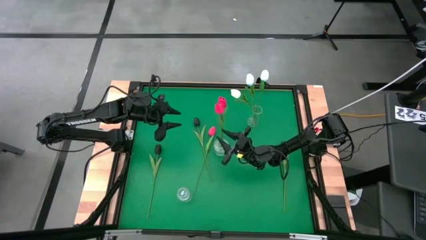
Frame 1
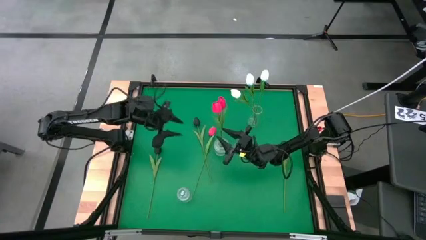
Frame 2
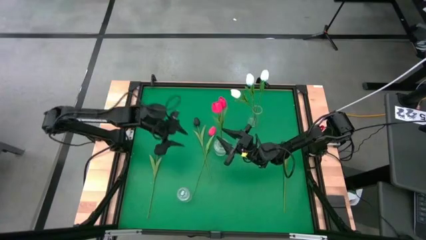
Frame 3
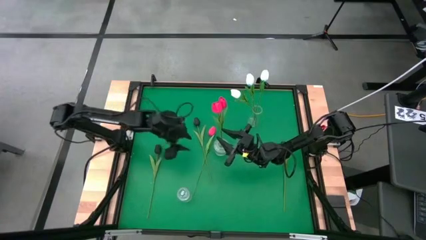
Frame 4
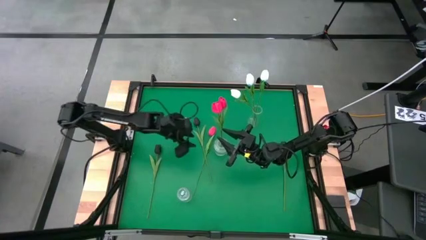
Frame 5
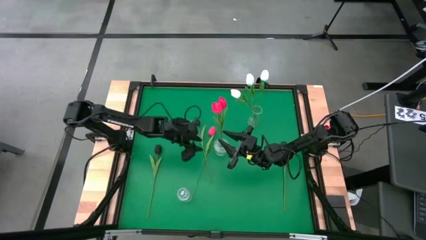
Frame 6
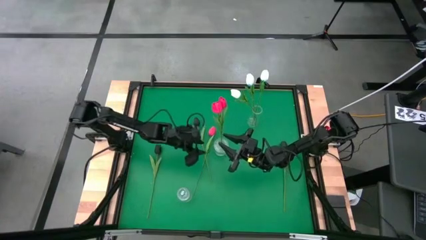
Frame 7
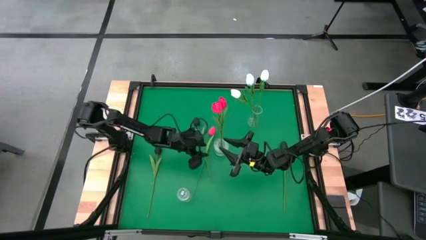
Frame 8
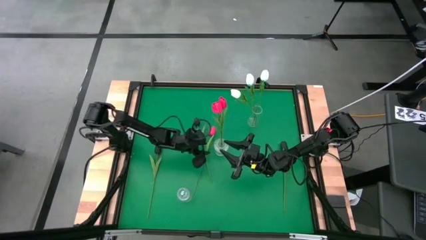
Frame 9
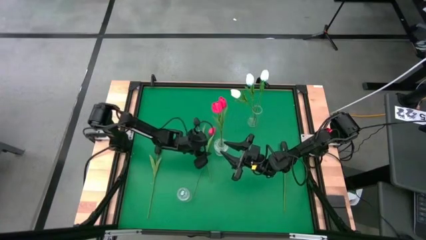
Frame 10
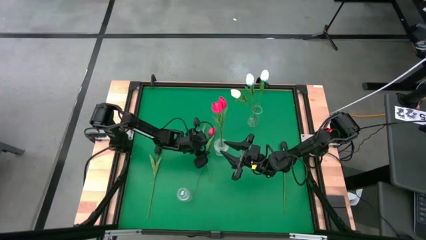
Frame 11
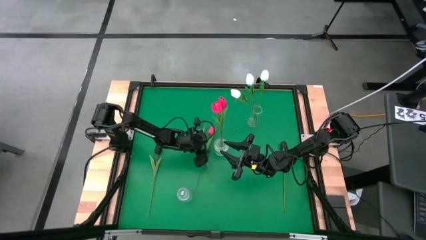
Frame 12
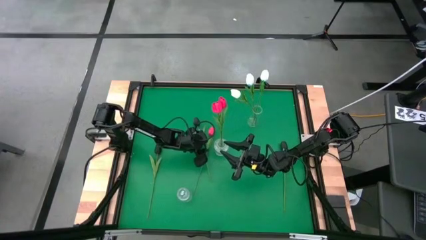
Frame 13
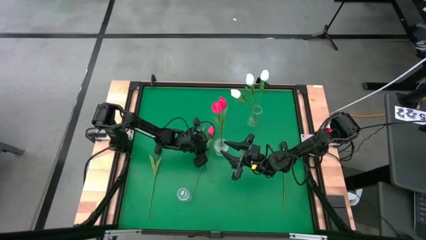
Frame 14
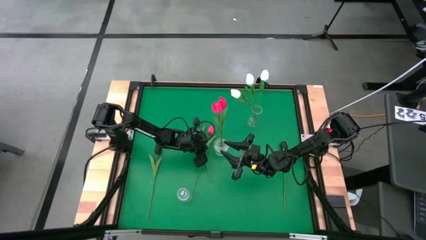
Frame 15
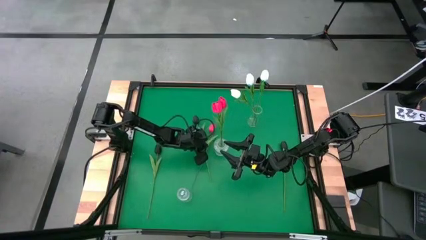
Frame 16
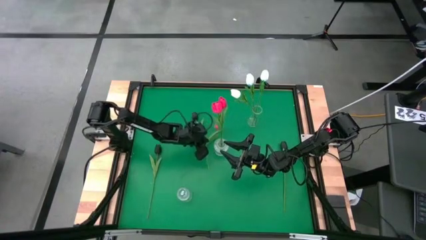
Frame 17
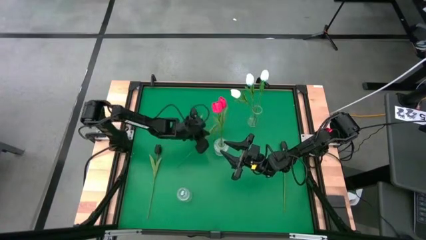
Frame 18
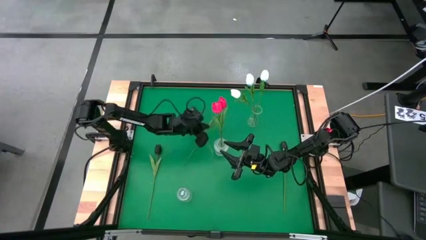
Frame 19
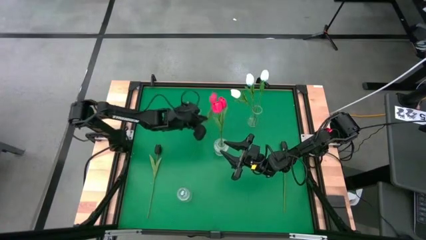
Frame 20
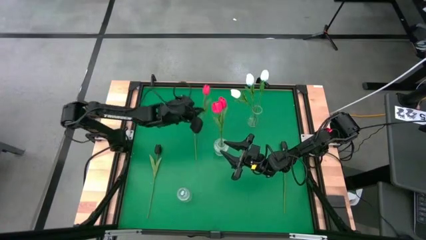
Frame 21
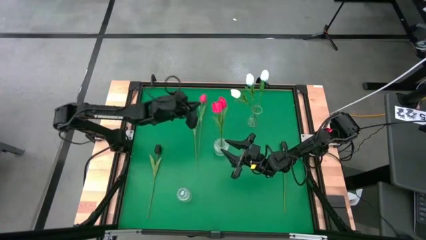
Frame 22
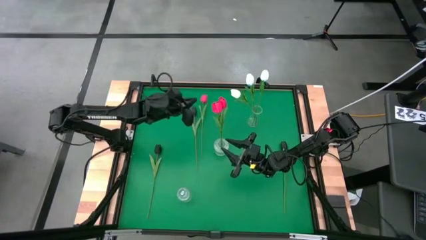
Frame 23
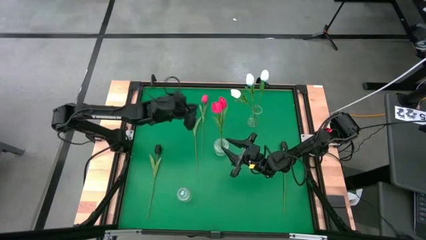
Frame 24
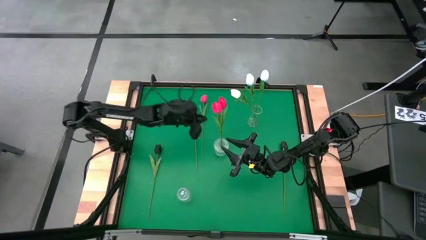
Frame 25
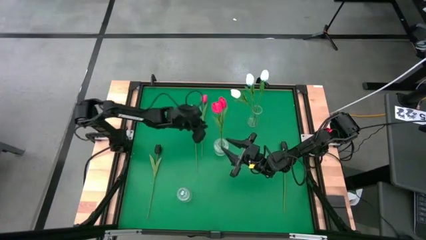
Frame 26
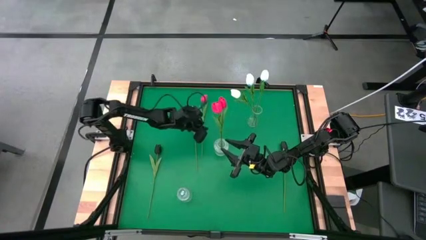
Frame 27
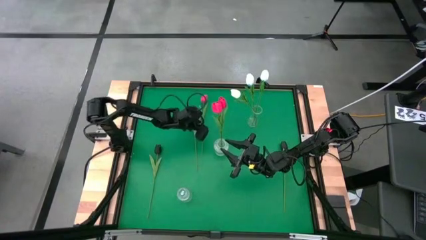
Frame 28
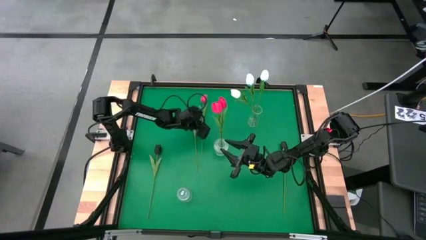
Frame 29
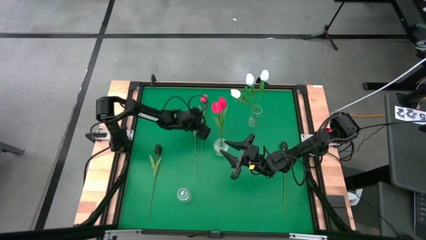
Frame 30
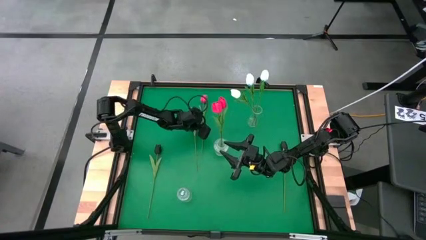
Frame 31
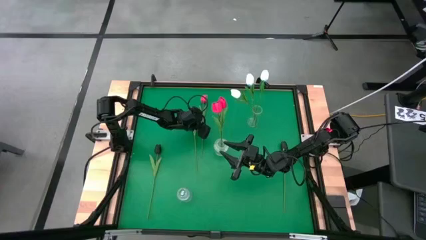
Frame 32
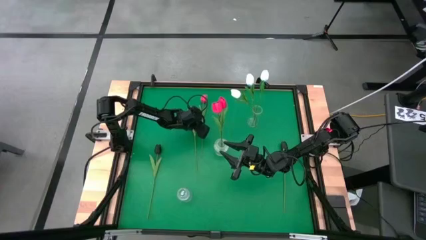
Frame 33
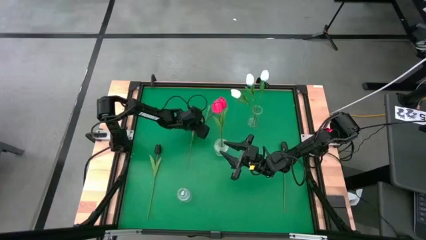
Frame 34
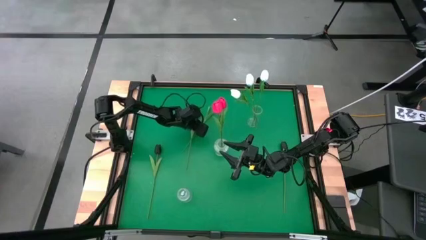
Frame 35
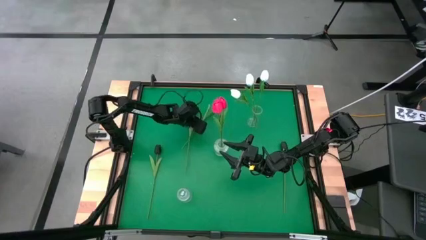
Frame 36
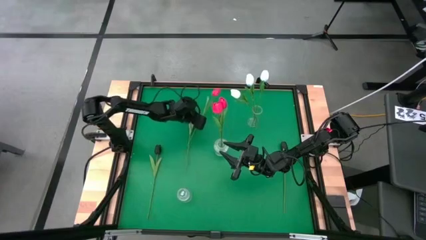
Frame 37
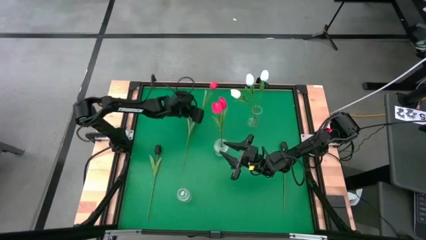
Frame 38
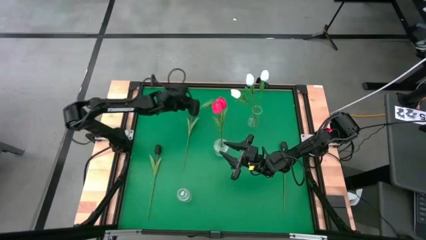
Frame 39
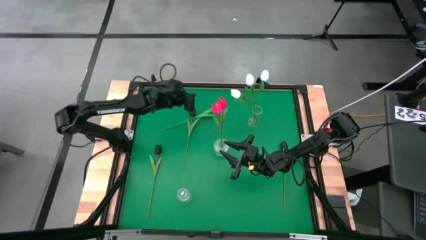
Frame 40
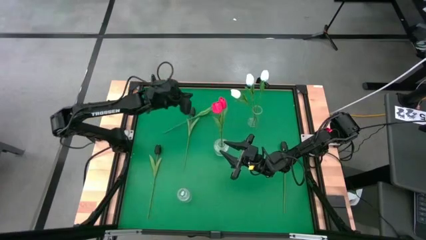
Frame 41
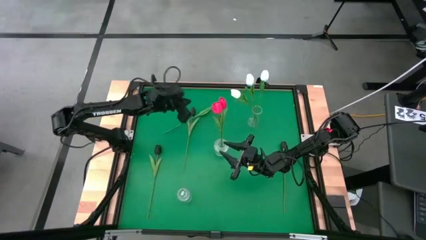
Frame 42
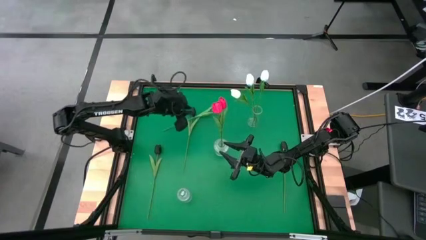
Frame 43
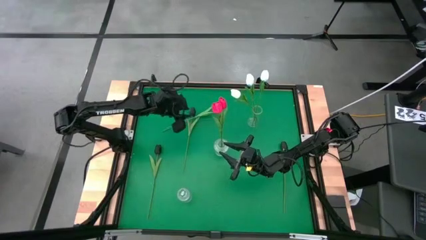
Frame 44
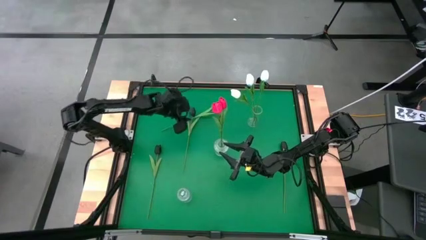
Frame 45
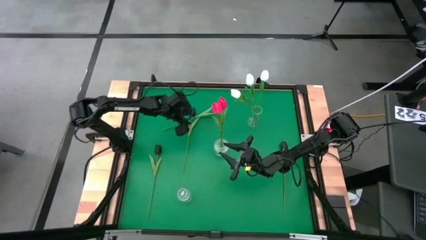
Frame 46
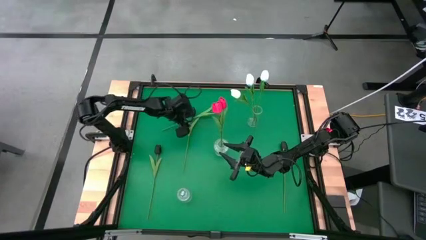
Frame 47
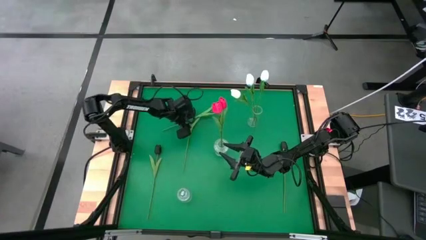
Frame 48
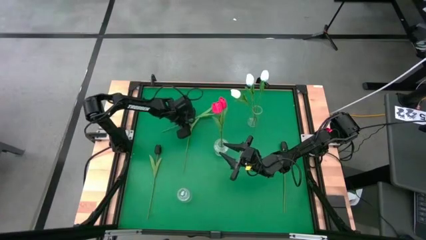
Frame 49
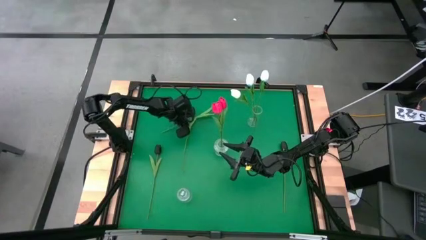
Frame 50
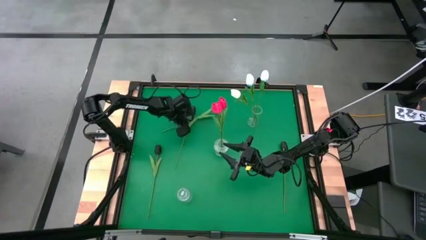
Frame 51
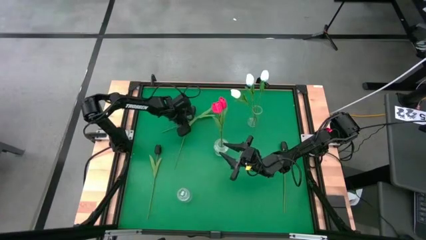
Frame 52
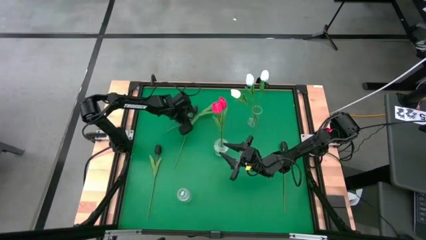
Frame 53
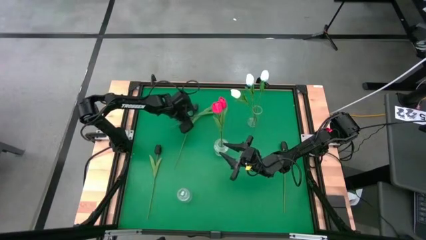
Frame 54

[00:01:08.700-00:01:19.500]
Task: Sort flowers into vase by color
Put the red tulip into the middle transparent flower vase

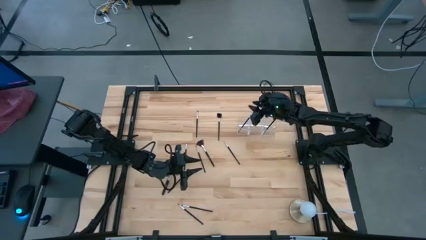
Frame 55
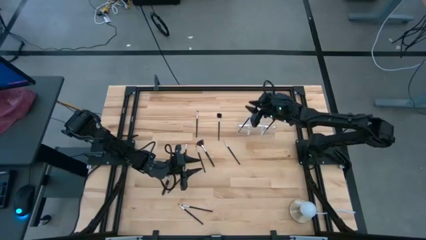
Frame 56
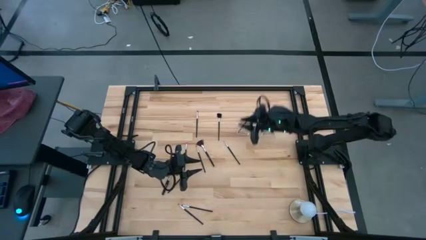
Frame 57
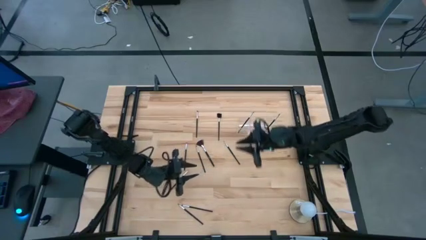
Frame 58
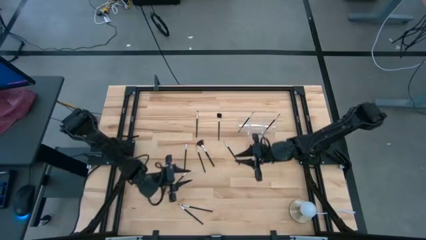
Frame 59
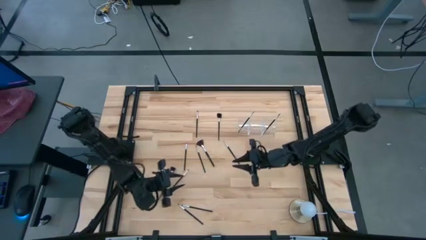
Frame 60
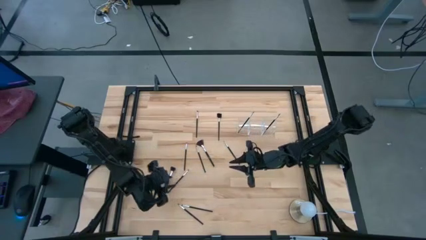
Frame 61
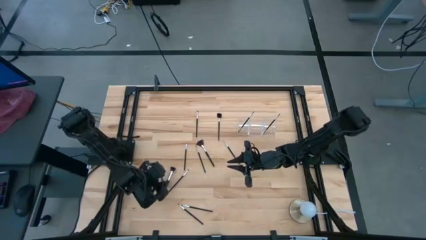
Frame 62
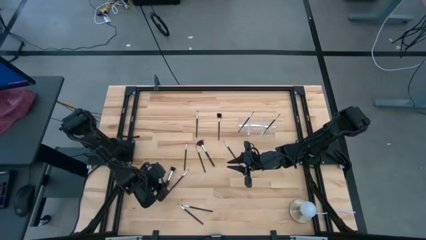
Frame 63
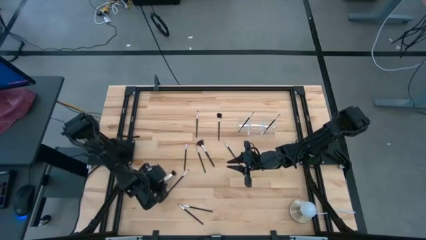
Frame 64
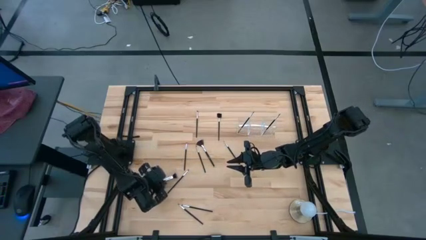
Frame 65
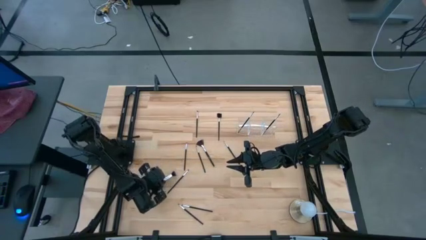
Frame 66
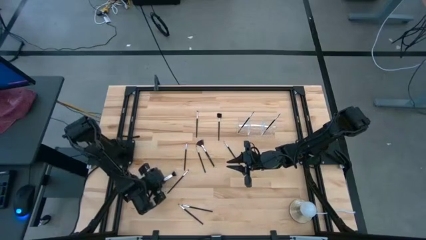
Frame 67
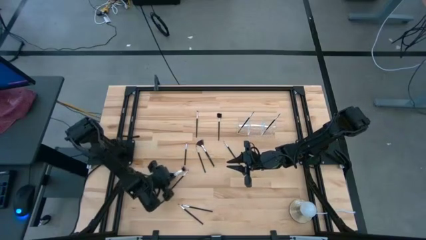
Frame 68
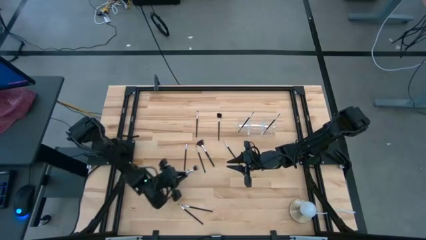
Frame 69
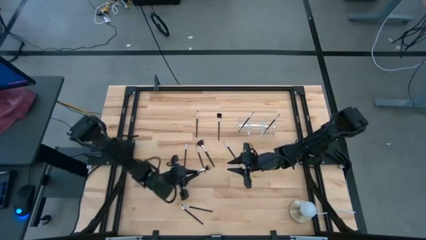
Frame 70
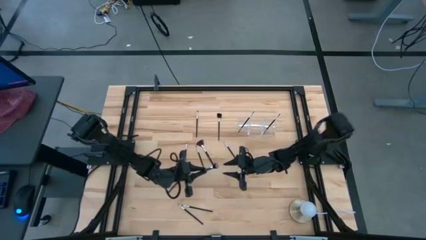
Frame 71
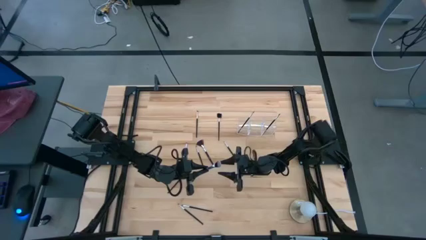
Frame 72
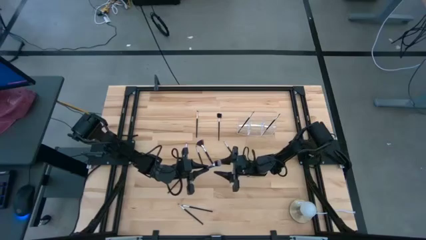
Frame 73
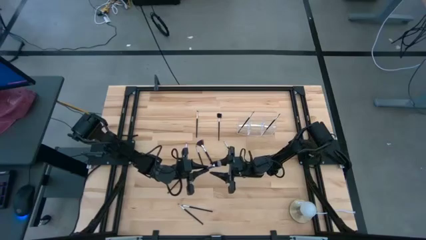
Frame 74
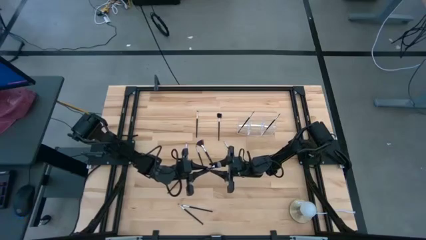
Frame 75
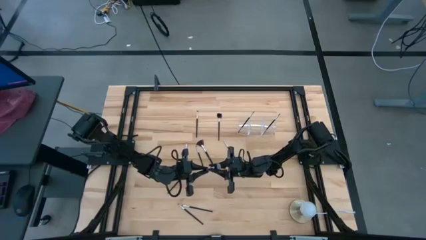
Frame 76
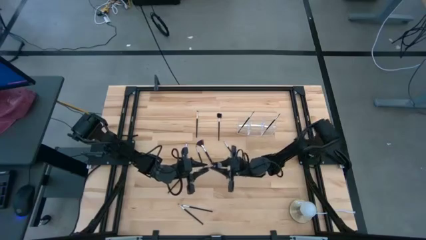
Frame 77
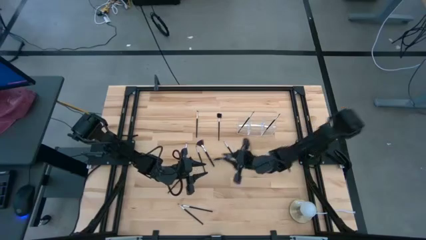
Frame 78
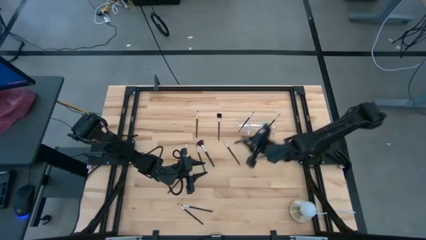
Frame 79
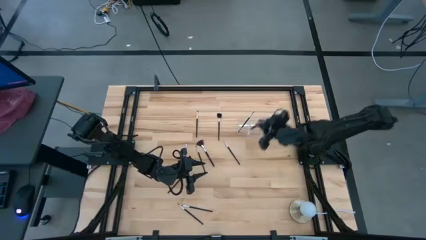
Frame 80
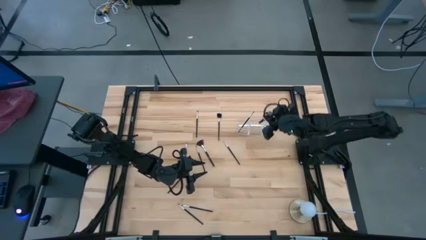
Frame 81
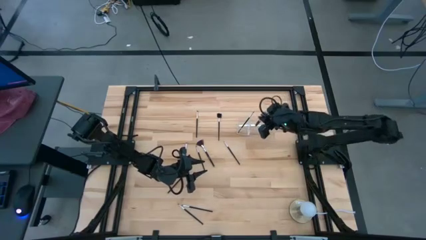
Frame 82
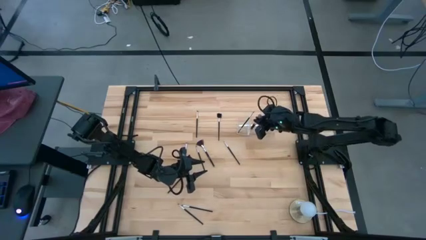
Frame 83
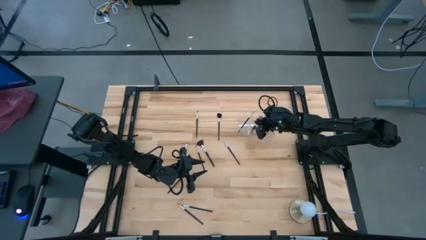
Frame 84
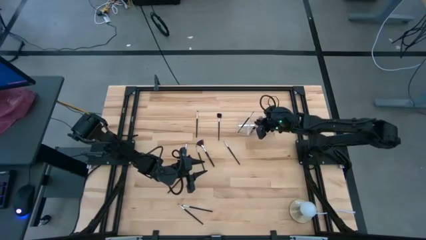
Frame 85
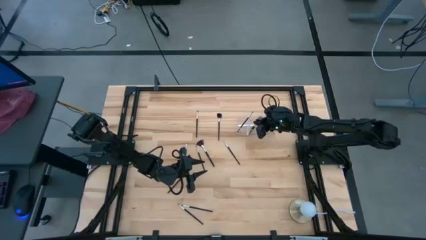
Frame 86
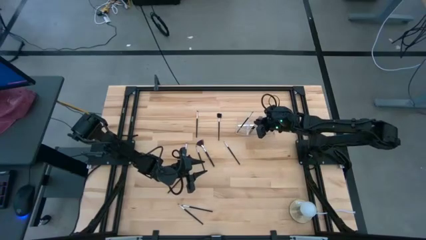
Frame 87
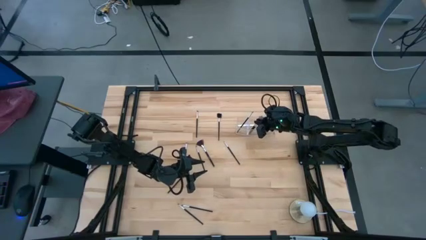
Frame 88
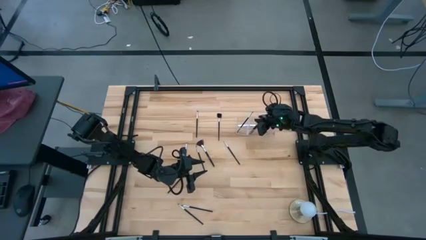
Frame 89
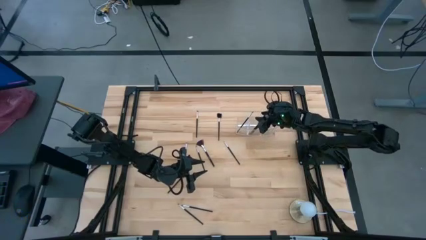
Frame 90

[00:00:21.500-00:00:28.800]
Task: Put items in baskets/containers
Put the black powder brush into the transparent organizer
